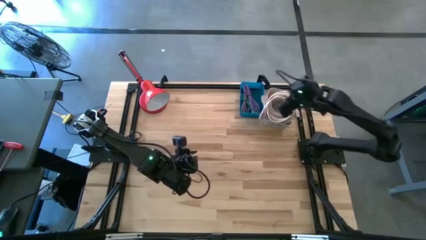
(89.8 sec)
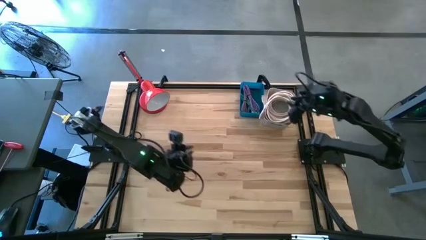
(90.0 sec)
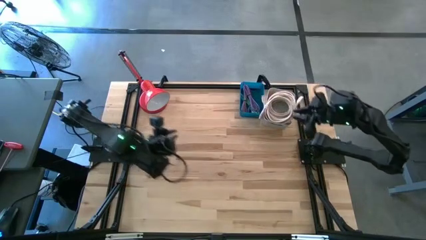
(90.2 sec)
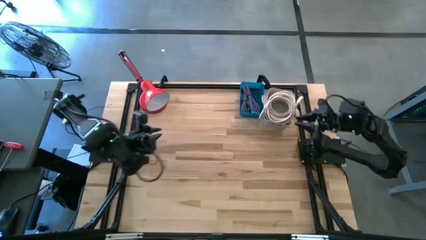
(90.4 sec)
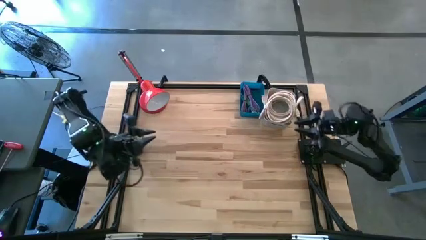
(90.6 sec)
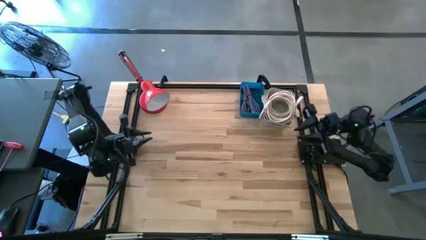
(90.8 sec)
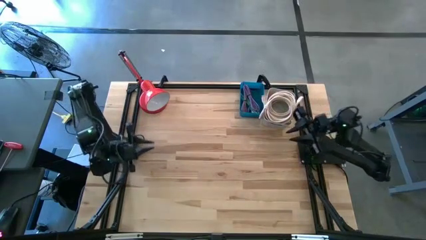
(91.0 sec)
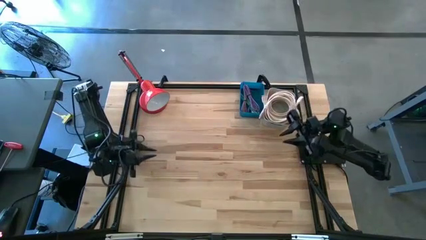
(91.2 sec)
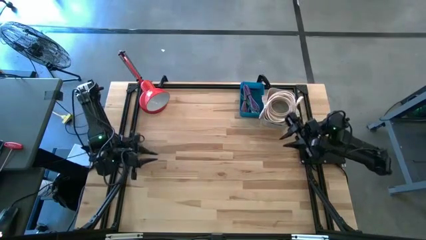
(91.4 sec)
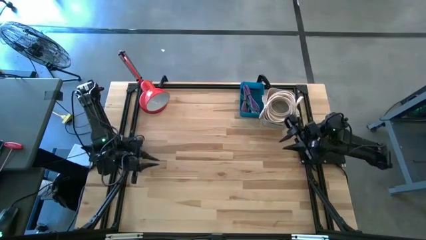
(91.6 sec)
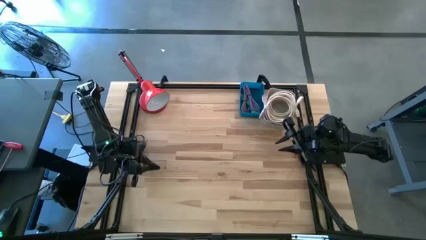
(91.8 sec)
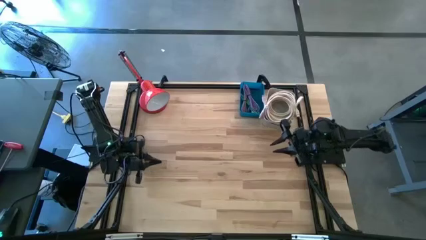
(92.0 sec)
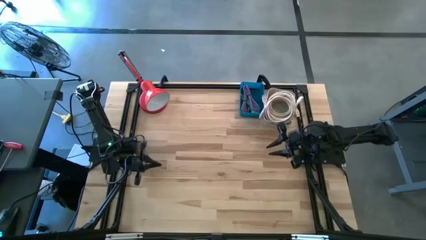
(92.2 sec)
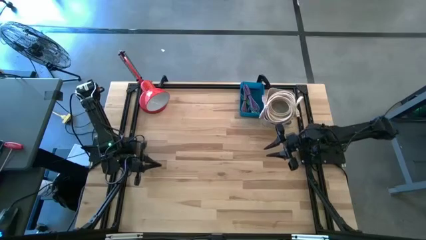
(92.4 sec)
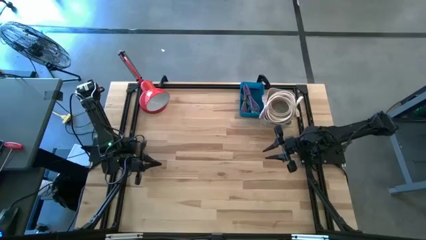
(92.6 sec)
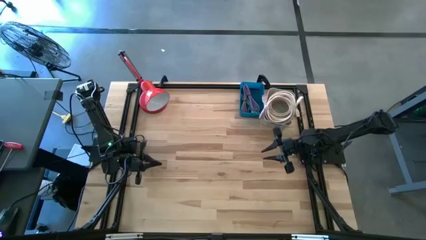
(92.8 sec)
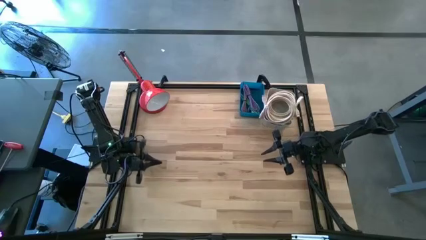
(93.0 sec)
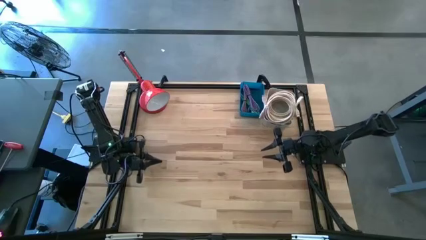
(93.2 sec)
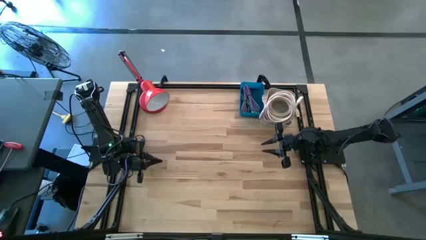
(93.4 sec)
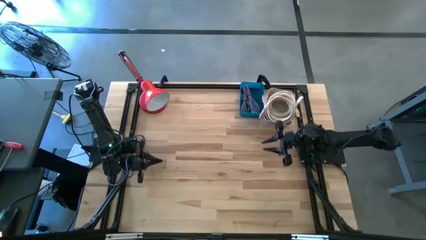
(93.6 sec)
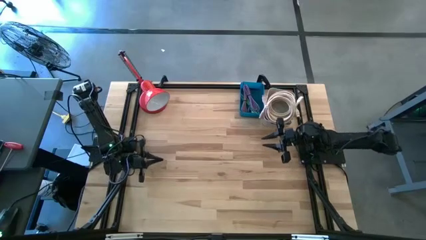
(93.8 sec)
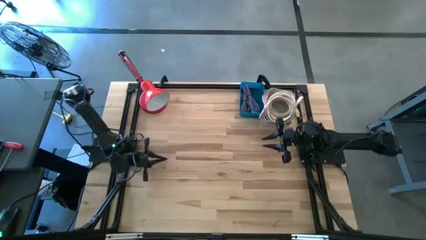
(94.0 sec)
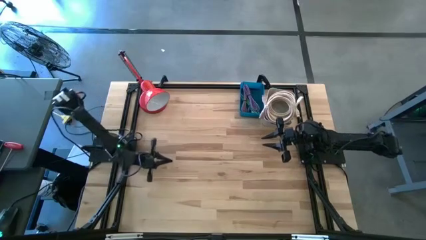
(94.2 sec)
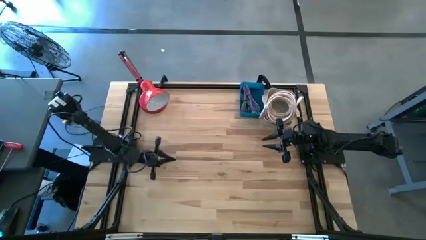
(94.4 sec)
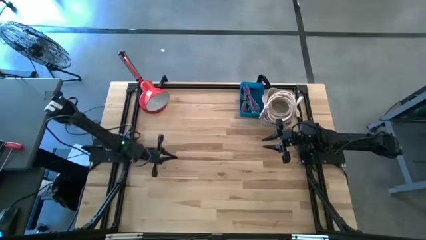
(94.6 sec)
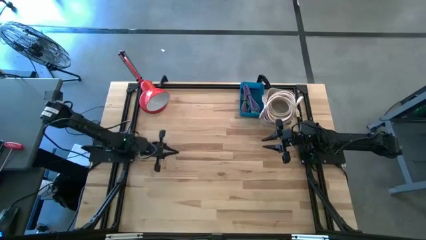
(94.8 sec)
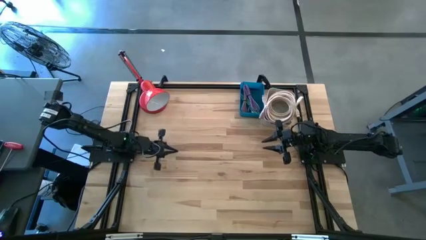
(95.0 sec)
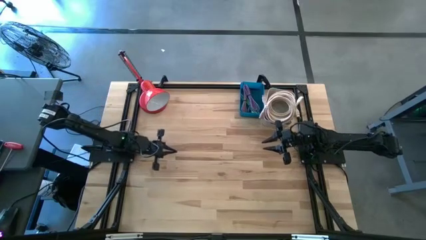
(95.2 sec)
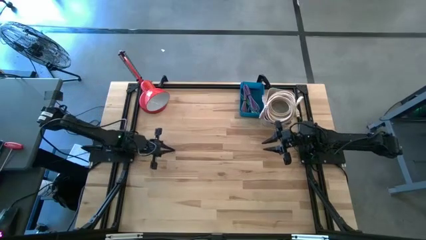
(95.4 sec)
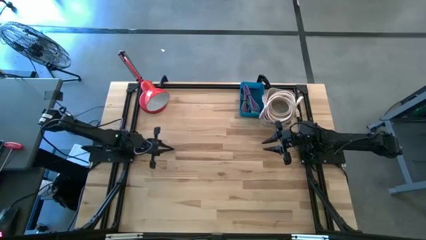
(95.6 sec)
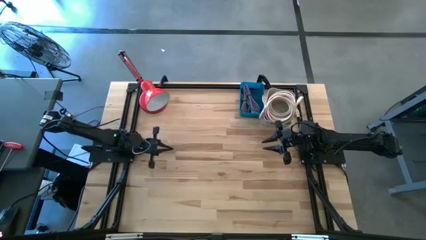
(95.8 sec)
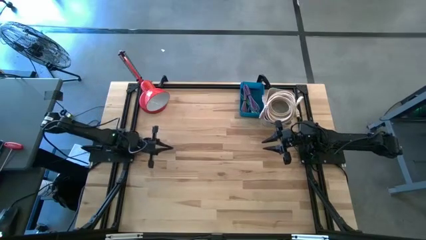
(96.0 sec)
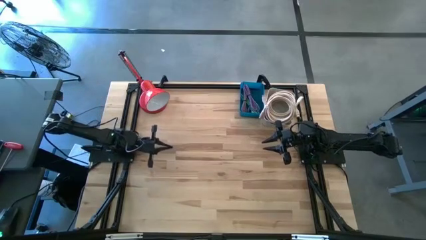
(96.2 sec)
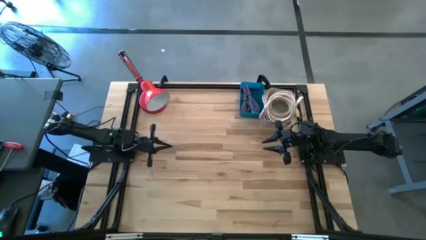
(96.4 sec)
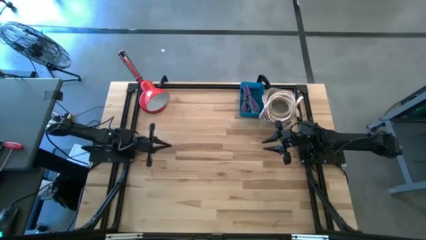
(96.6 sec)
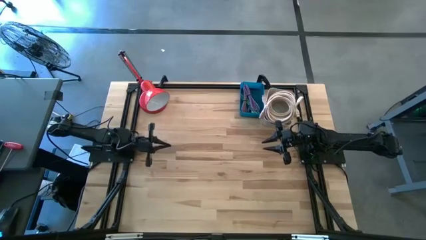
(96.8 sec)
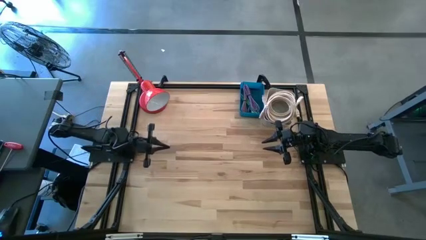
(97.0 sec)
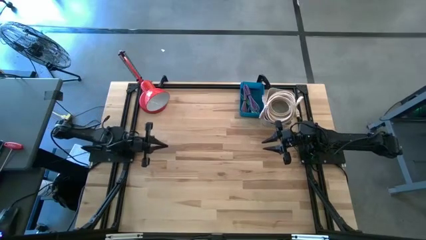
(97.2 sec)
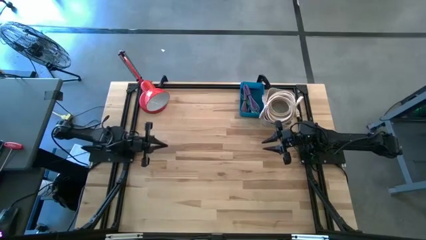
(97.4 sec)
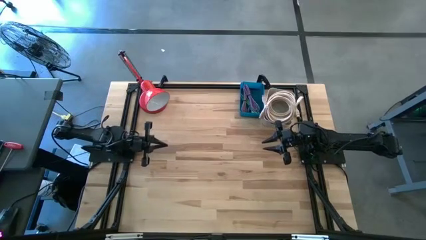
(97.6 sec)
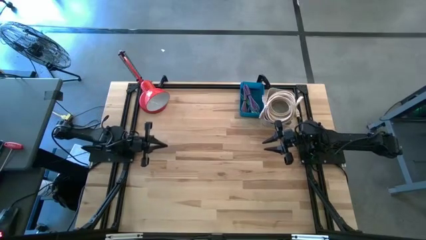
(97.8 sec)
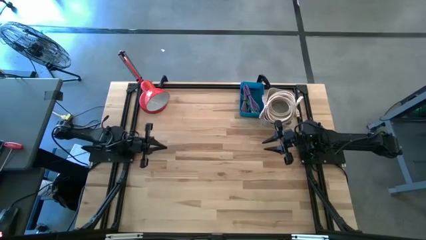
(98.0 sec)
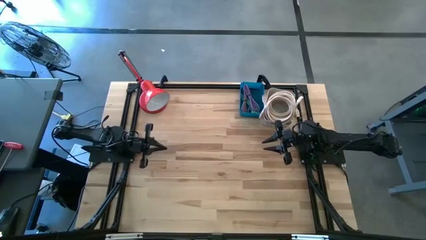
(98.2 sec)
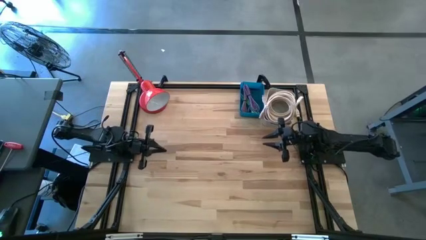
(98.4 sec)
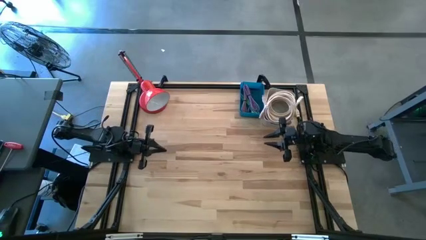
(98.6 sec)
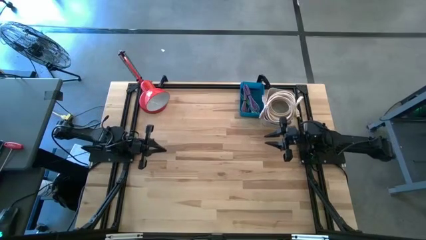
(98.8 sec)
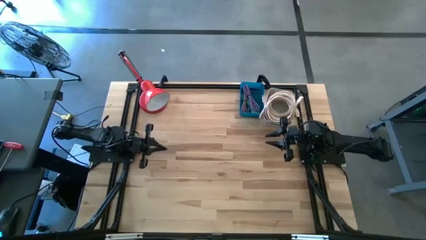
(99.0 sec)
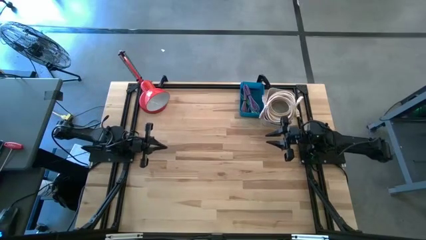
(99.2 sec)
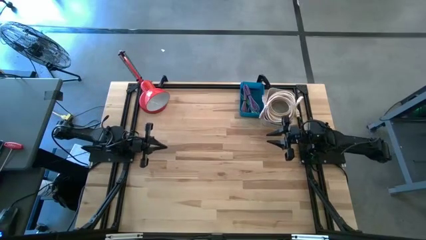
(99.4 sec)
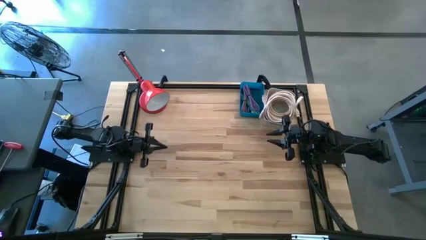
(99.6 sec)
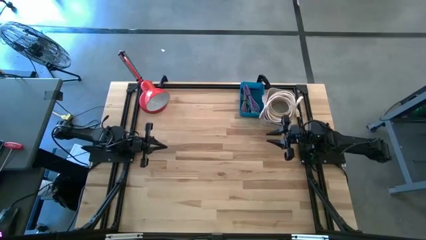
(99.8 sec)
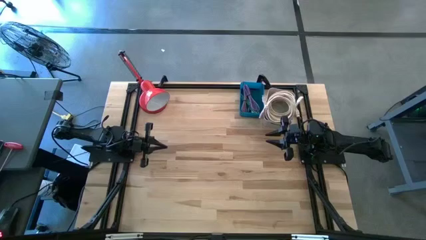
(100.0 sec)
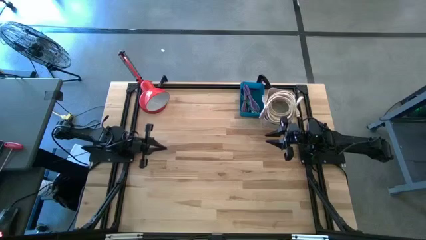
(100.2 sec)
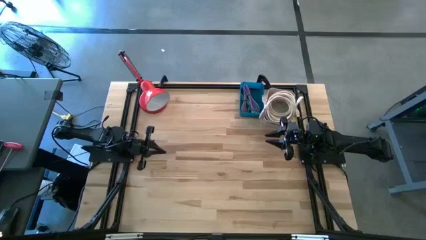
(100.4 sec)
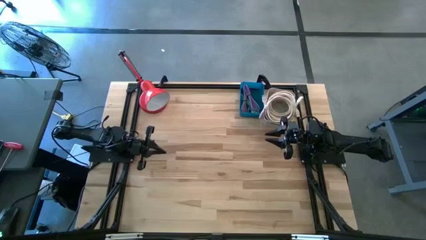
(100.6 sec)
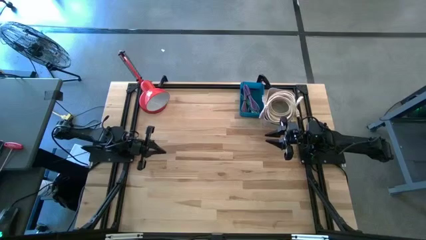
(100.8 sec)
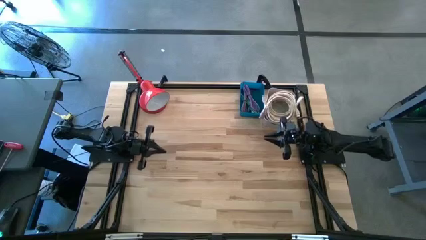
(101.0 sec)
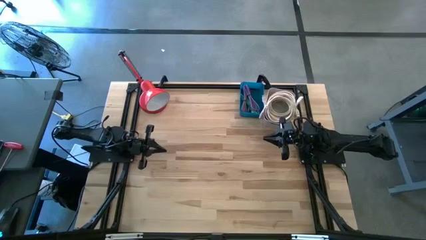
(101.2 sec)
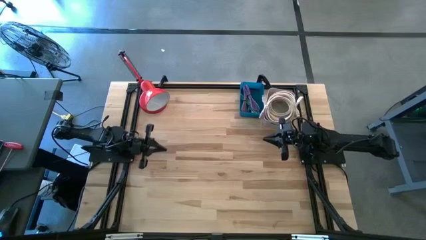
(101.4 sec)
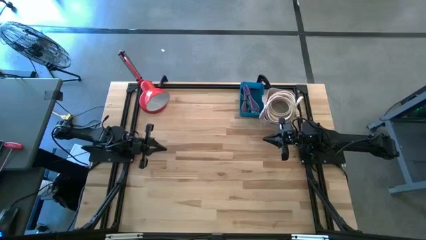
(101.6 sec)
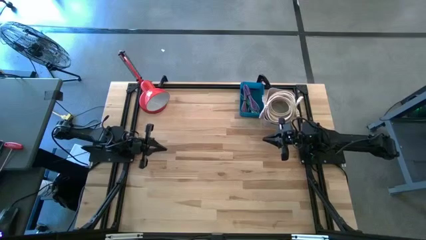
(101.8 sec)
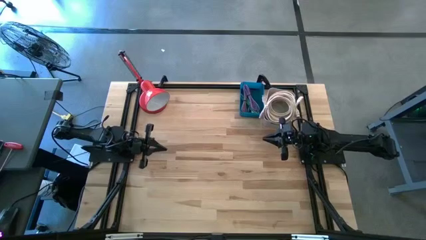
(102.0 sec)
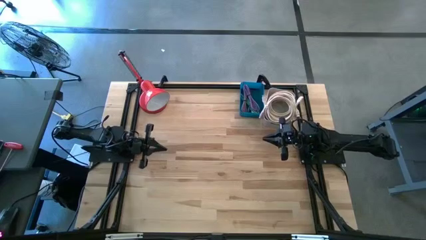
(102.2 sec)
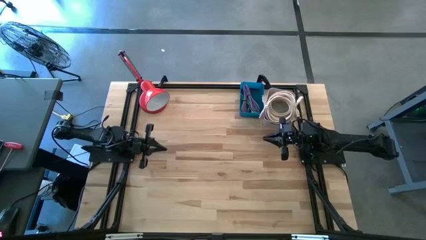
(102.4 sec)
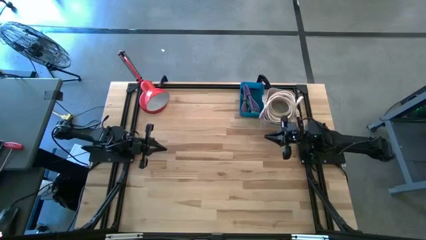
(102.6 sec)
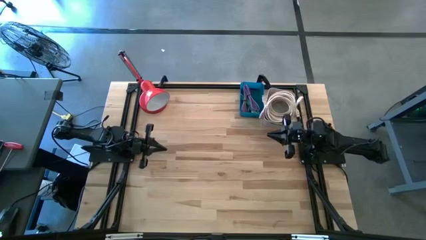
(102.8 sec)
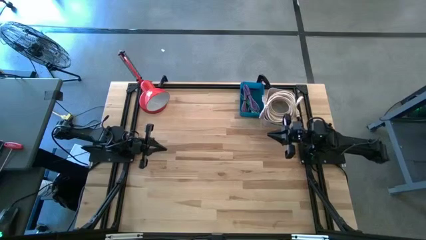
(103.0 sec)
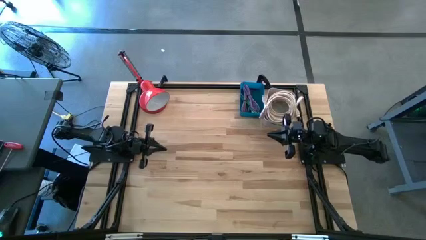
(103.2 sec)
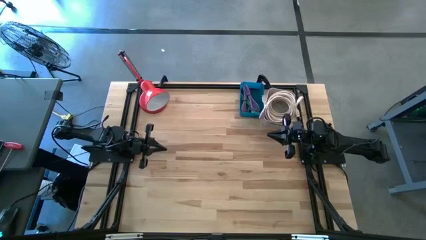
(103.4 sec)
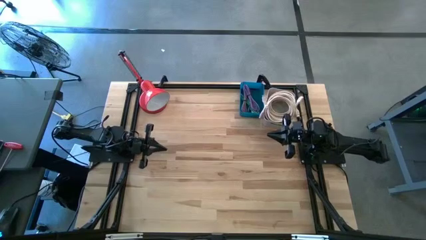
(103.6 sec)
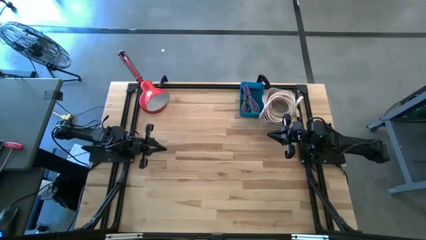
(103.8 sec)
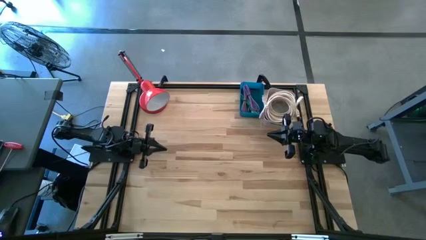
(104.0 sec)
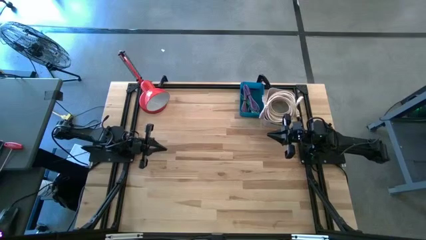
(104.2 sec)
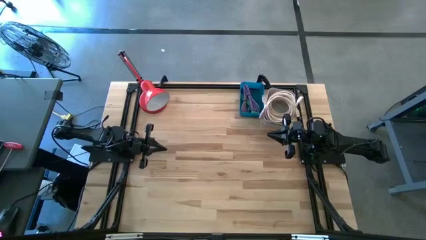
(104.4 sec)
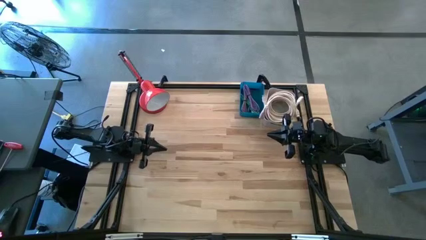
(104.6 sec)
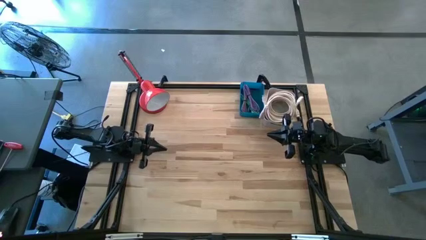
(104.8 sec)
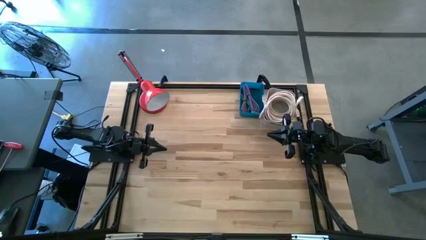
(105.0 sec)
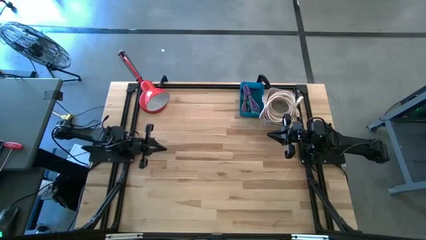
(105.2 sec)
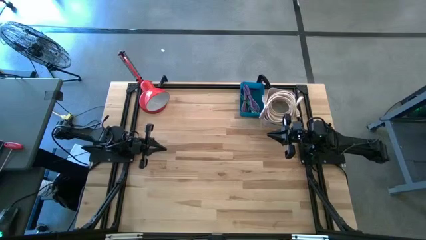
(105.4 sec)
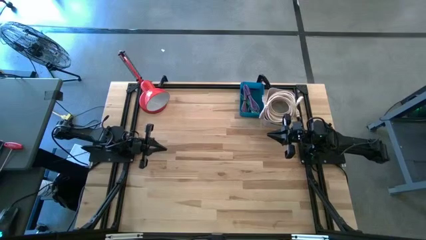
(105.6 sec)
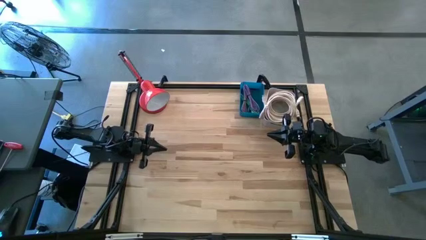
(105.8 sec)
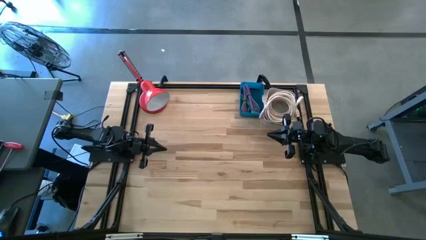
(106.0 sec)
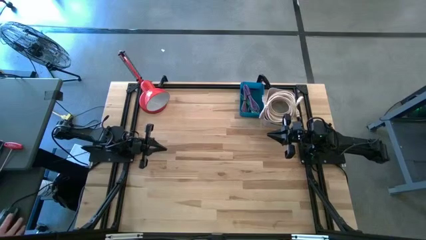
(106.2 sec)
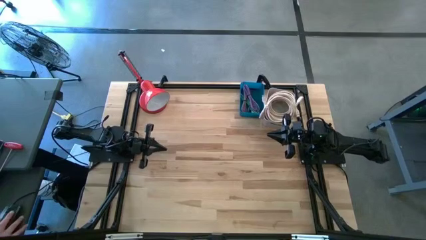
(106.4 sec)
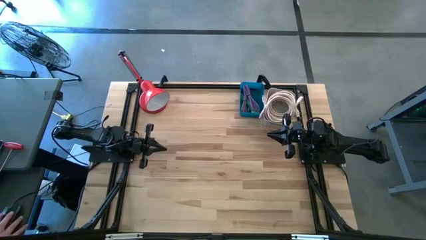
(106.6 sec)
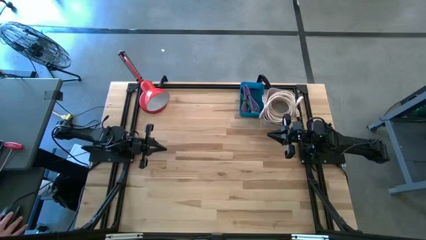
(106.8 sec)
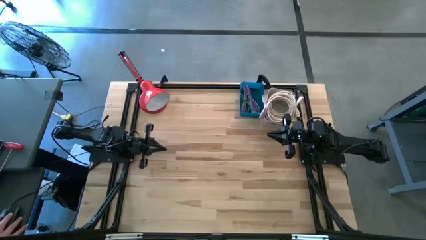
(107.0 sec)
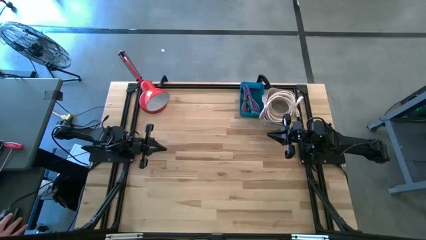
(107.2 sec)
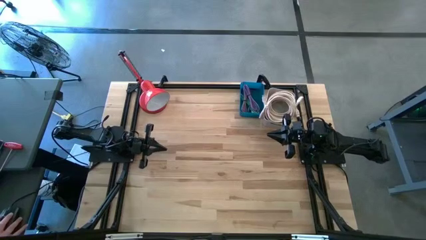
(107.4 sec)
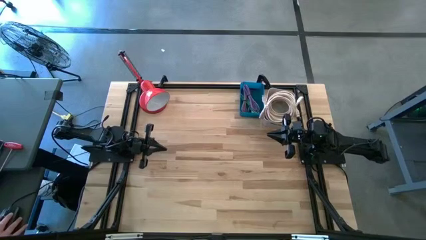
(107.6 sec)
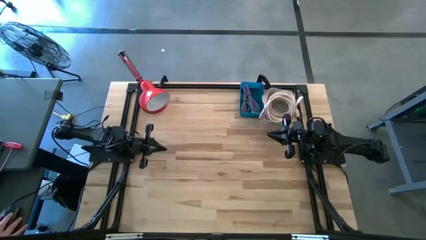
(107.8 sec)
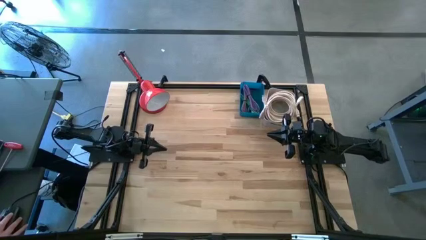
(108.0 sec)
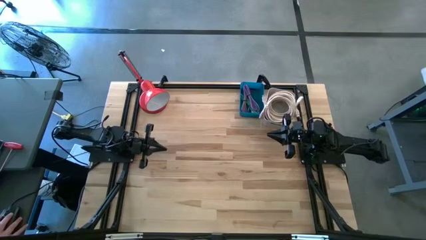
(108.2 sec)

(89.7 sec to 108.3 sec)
Task: Pick & Place USB Port
Return to Home Position
